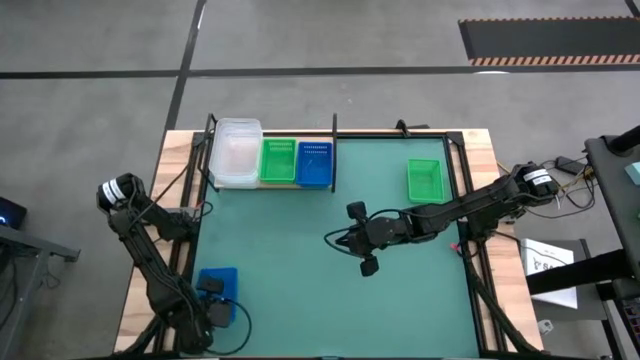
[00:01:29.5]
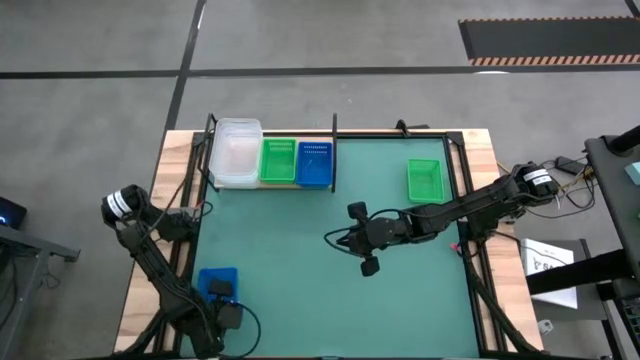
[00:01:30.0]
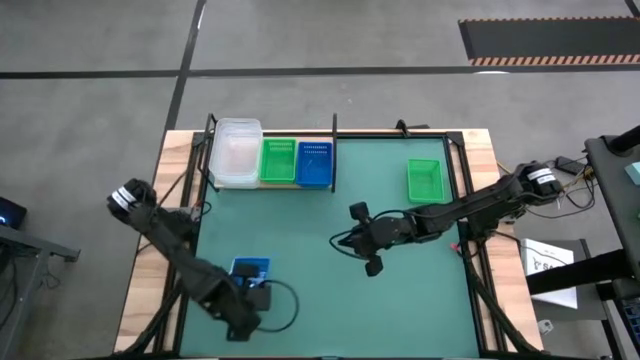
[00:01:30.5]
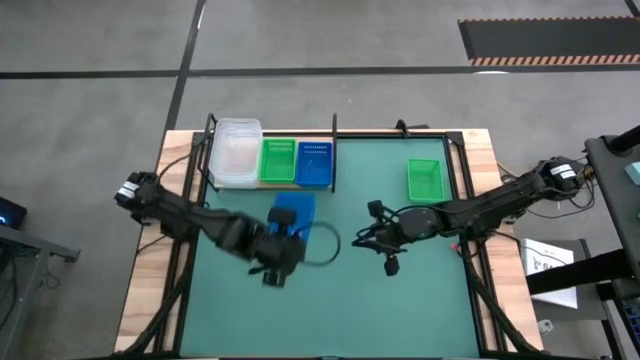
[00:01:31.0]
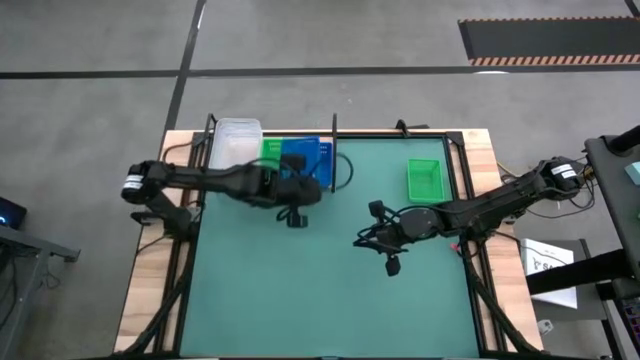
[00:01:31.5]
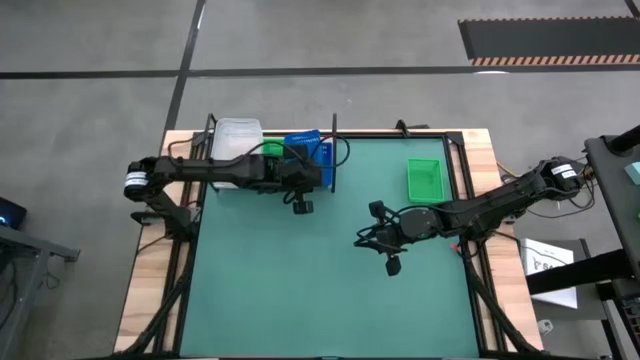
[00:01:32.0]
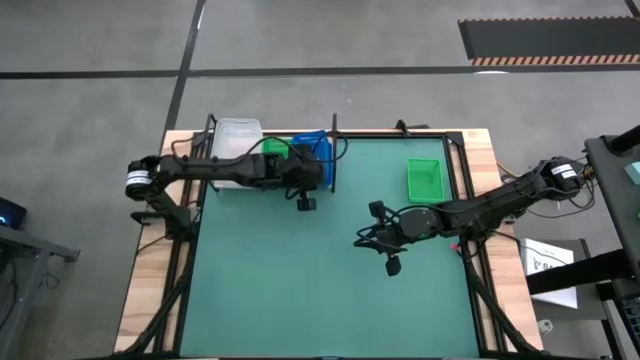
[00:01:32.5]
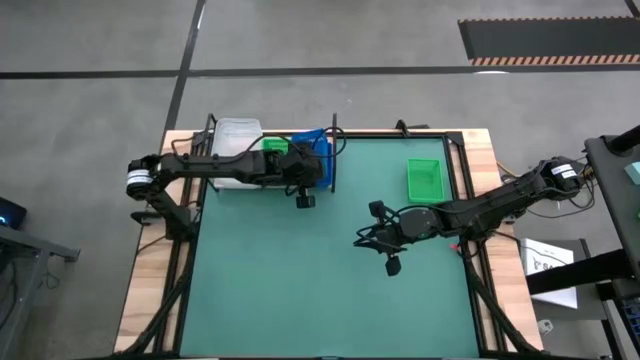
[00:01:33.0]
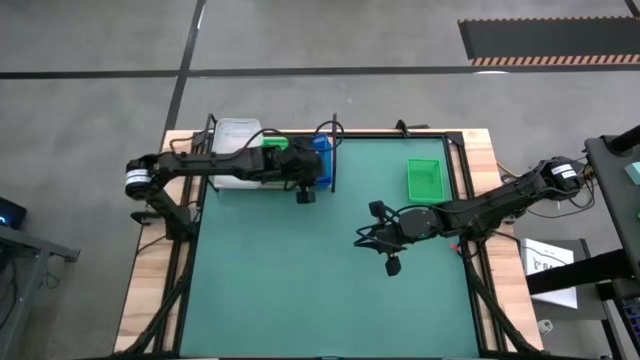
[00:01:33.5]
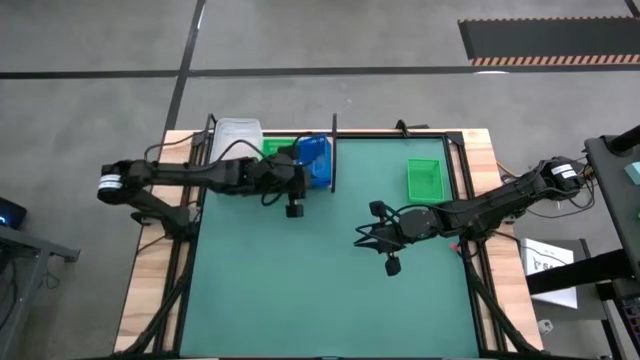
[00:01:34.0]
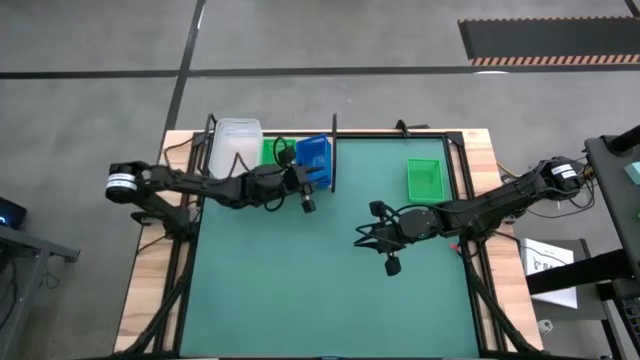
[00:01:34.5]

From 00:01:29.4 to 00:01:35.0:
Task: Stack baskets on shelf by color
Stack the blue bin on top of the other blue bins on the shelf

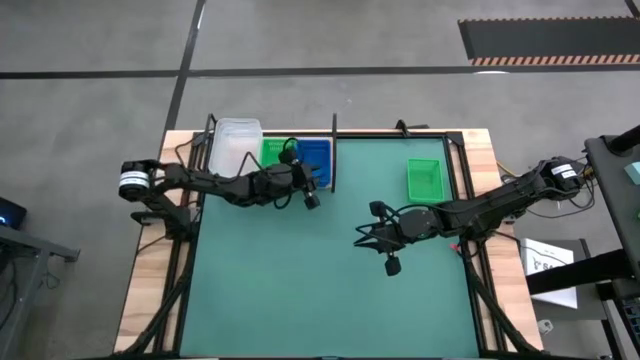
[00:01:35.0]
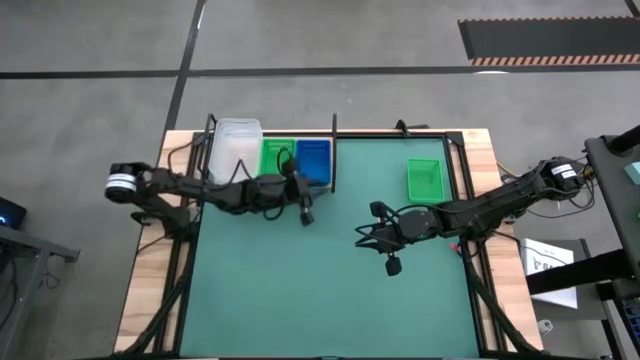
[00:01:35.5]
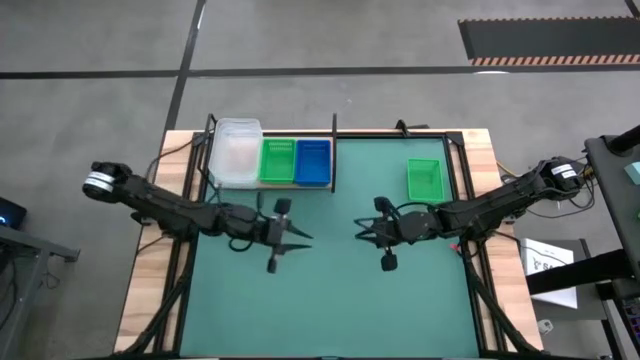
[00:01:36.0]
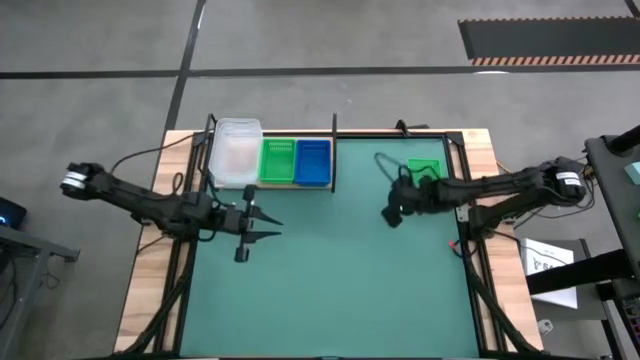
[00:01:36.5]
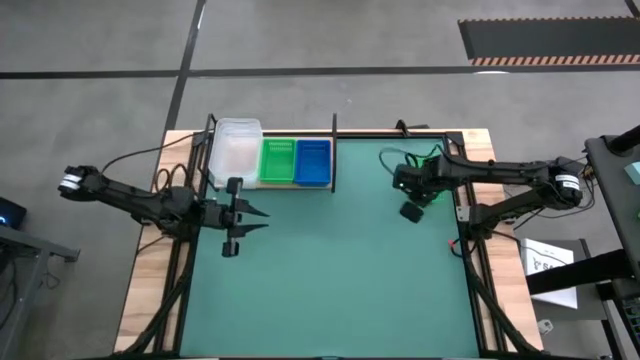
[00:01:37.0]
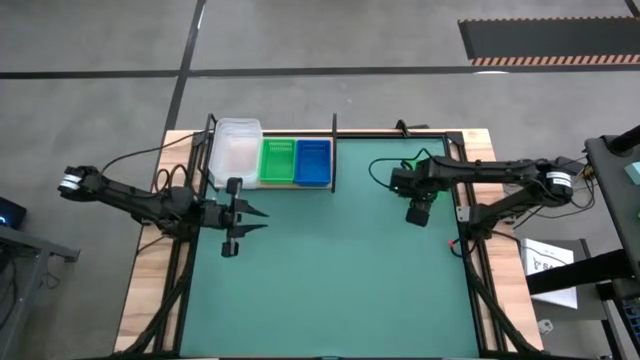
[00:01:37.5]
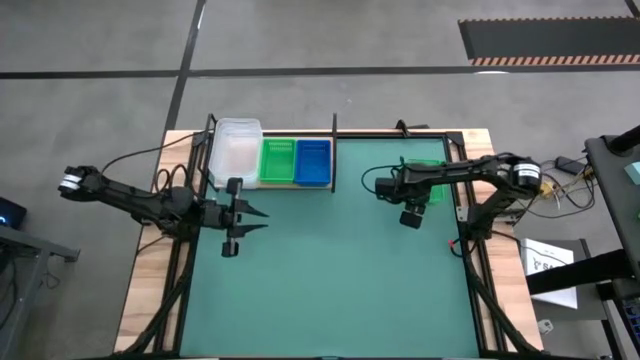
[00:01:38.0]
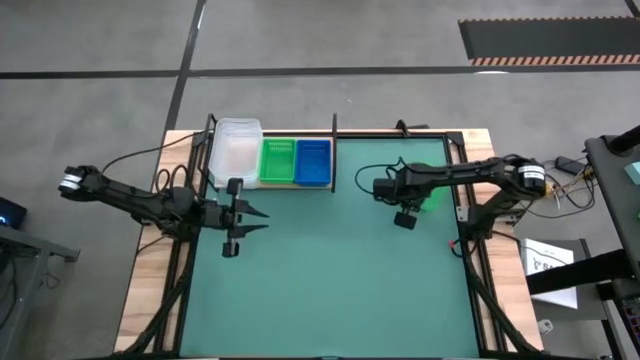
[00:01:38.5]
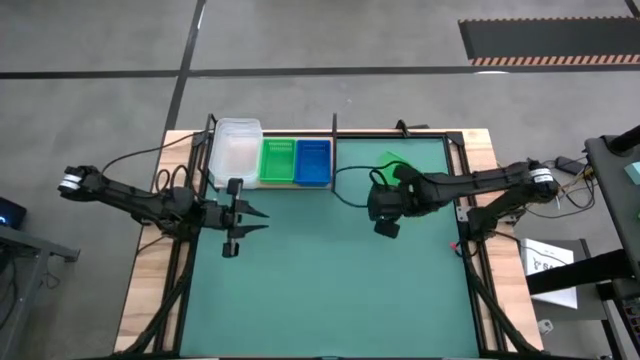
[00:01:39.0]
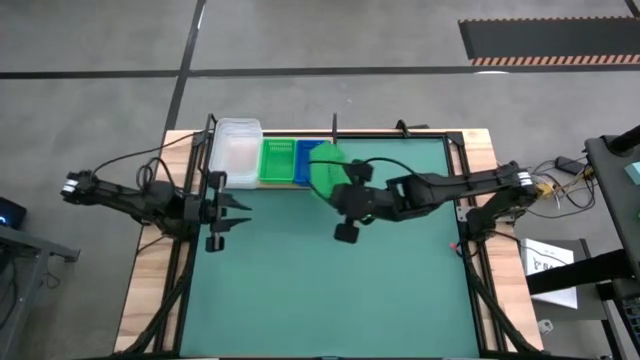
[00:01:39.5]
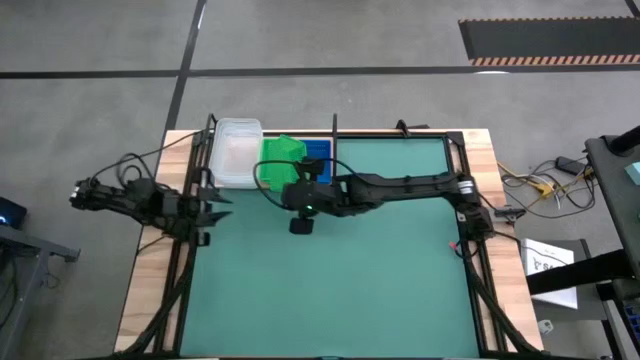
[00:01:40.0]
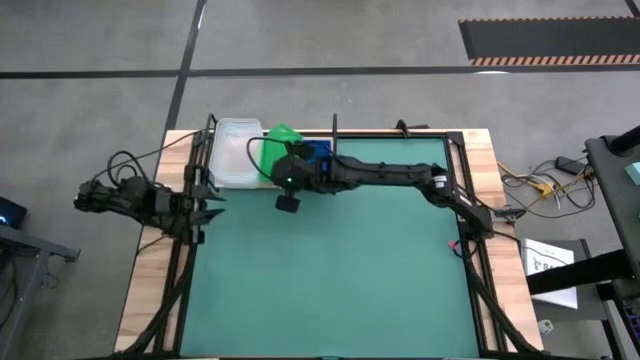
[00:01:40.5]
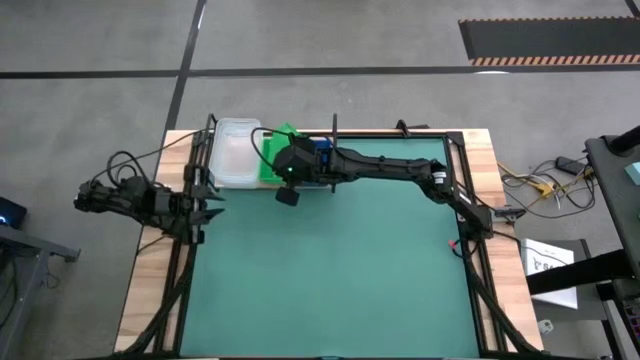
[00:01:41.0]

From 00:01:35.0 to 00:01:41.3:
Stack the green bin on top of the other green bins on the shelf

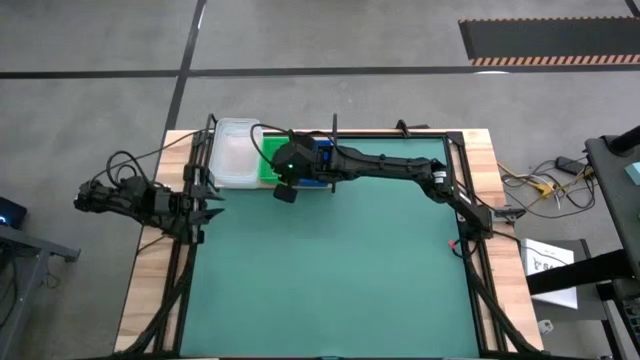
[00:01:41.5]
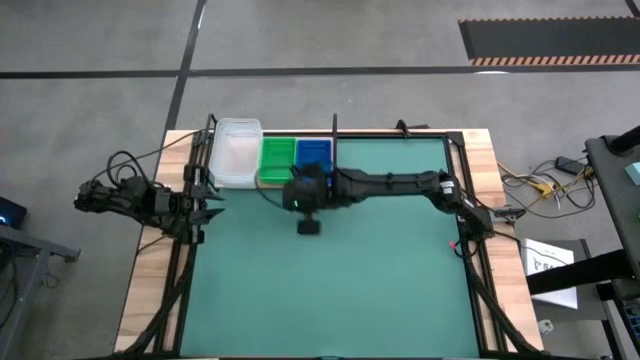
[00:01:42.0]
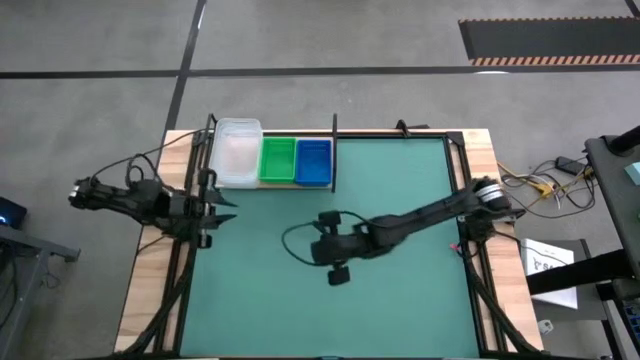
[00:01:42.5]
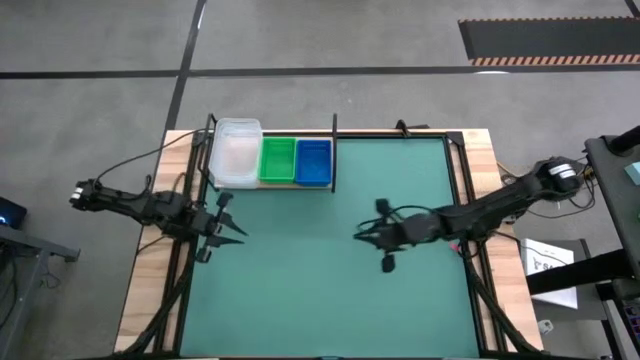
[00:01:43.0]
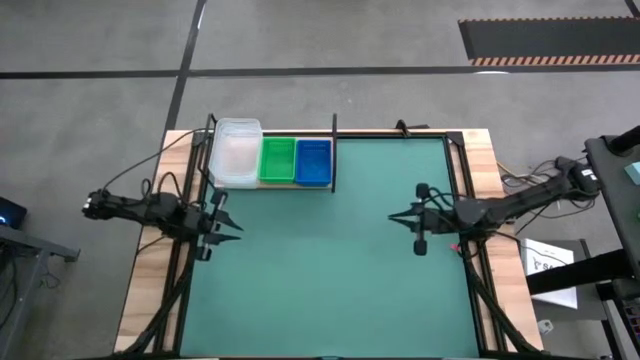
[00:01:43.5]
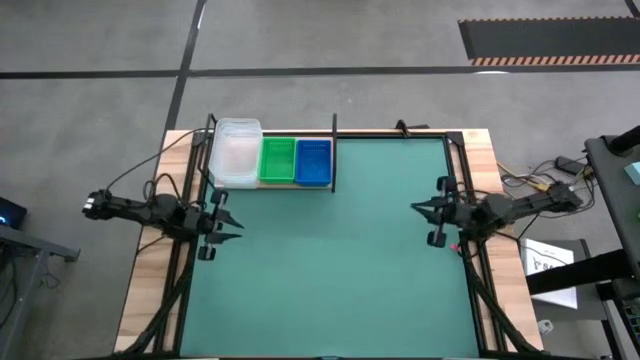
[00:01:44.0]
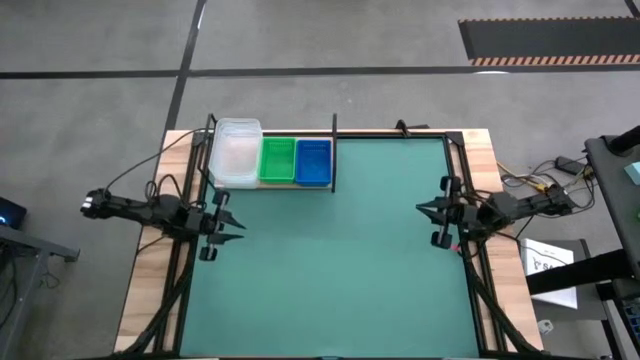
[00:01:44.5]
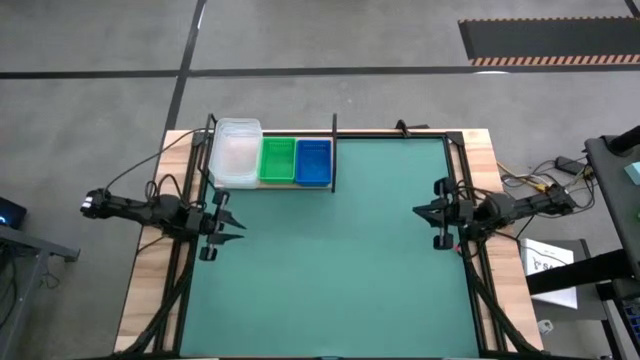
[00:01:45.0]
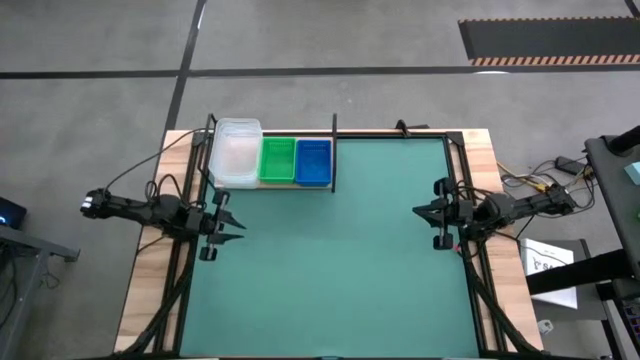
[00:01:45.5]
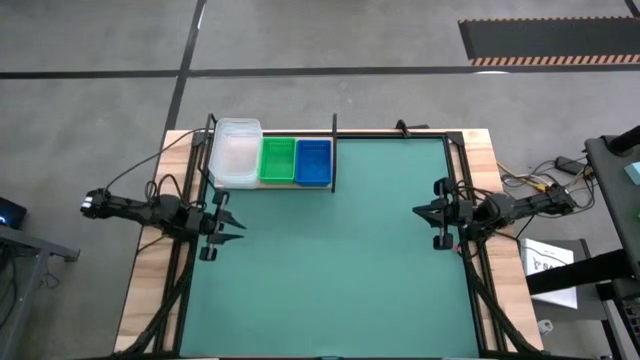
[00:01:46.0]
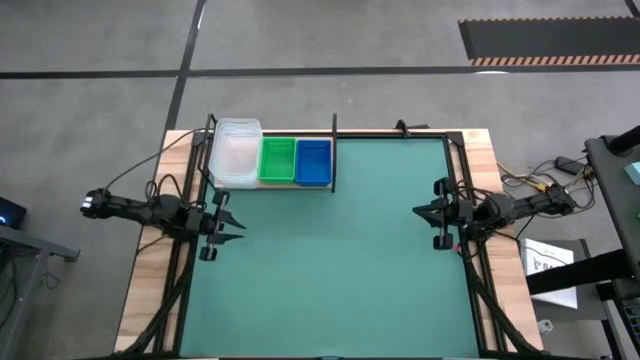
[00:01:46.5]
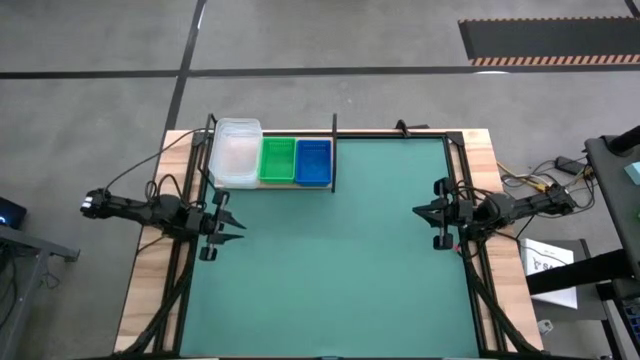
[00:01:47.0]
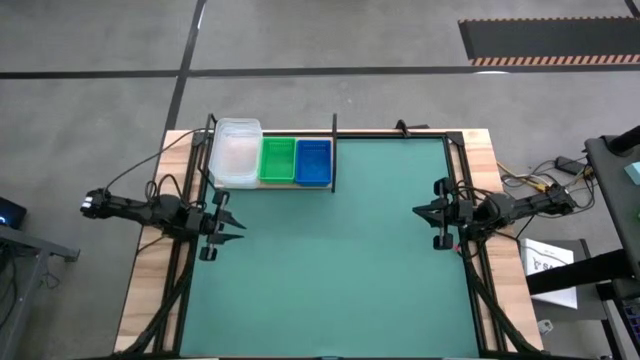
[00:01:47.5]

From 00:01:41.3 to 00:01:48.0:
Return to Home Position
